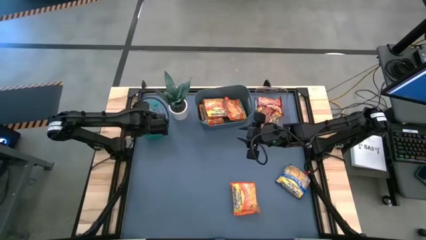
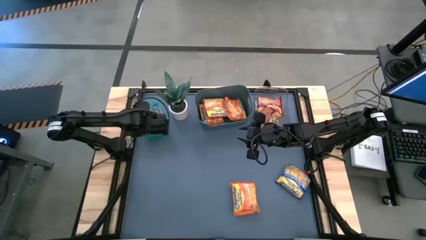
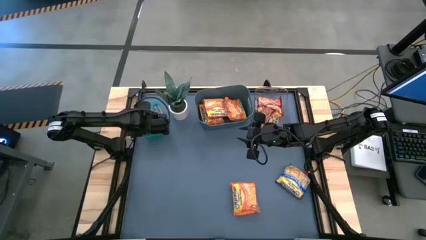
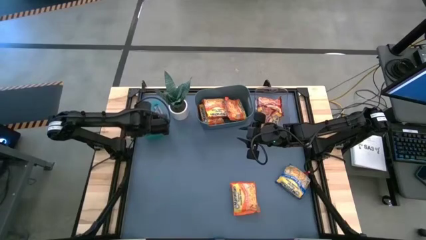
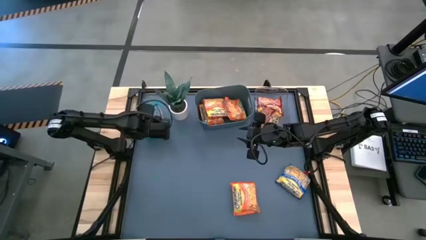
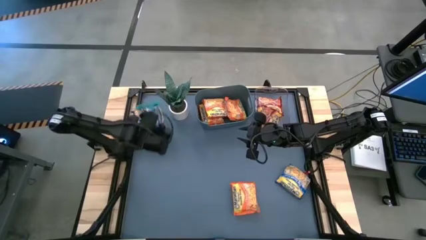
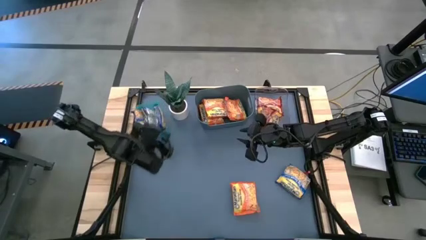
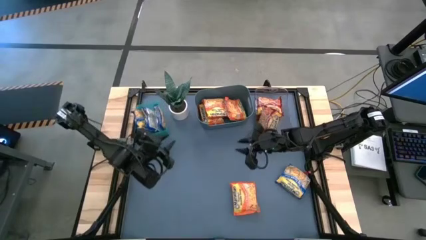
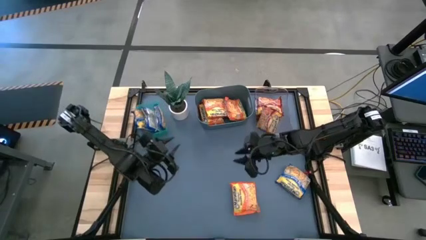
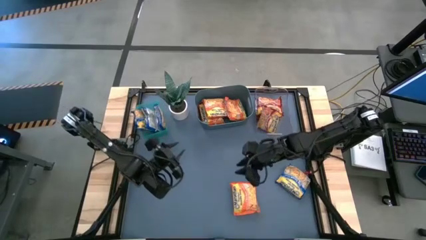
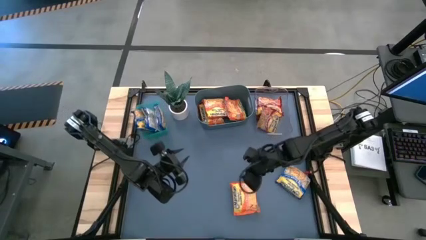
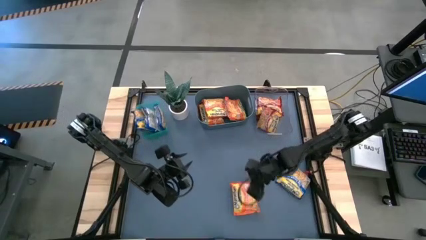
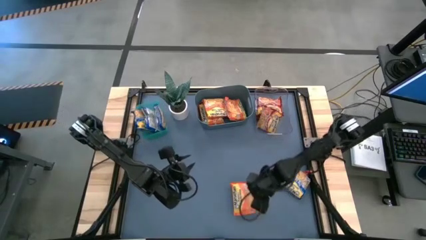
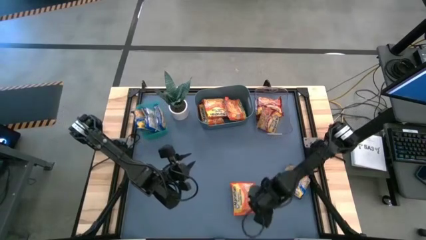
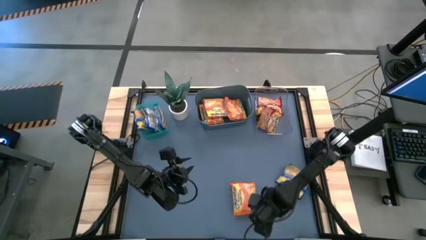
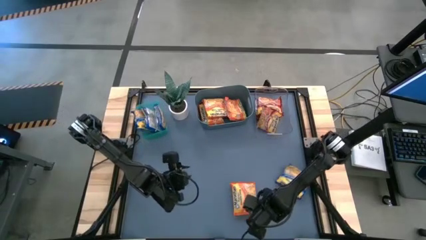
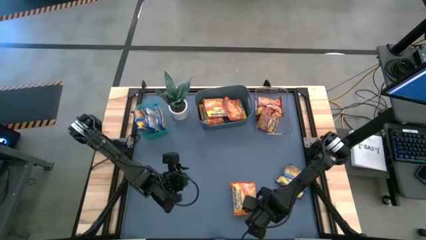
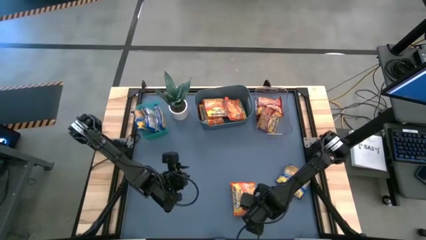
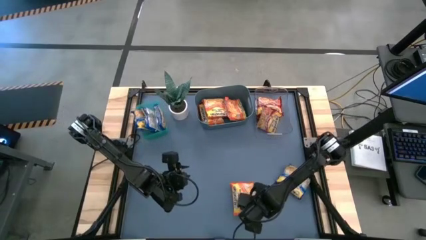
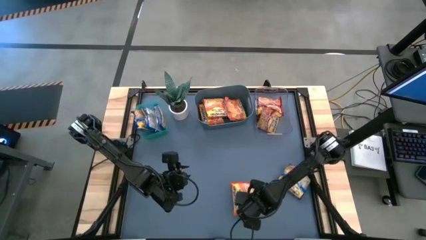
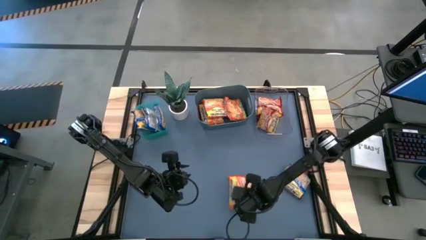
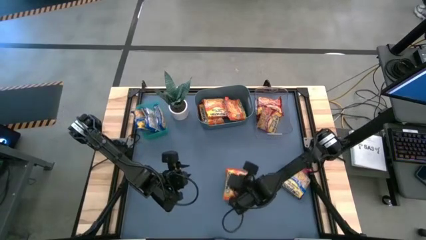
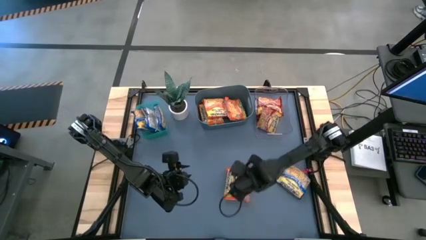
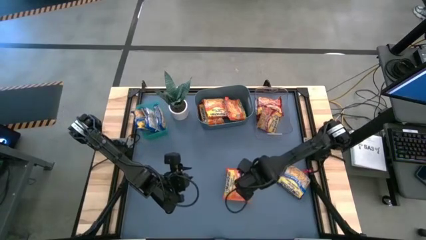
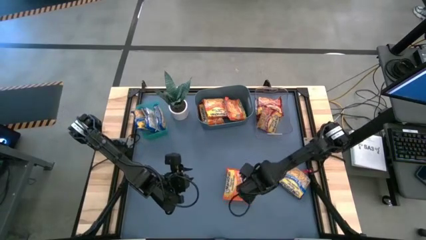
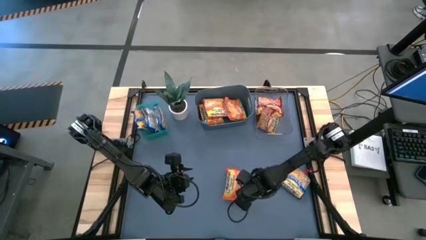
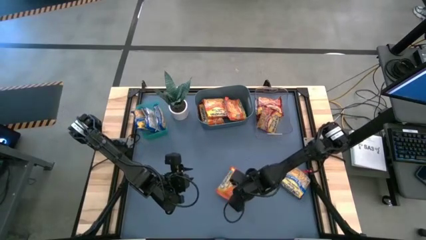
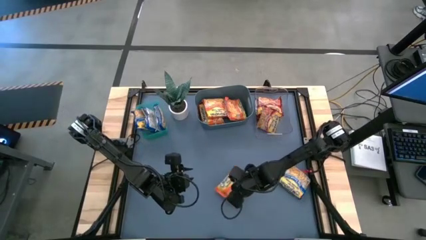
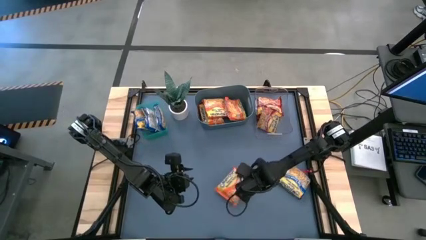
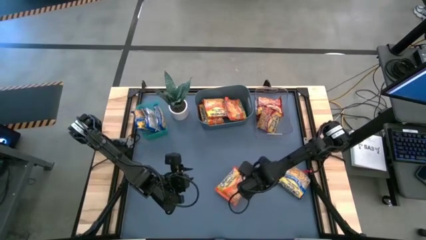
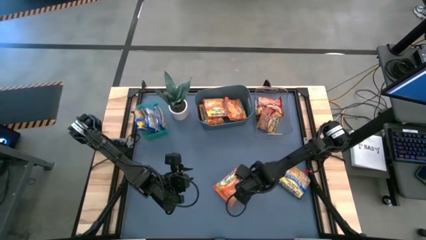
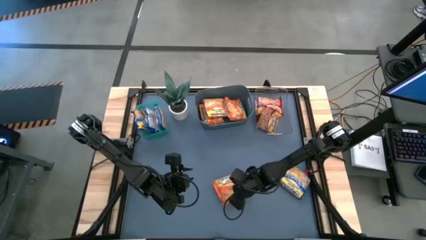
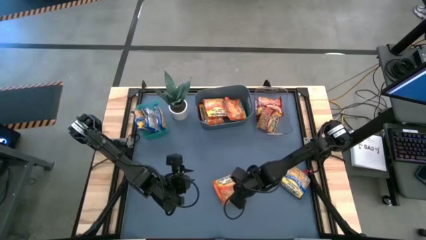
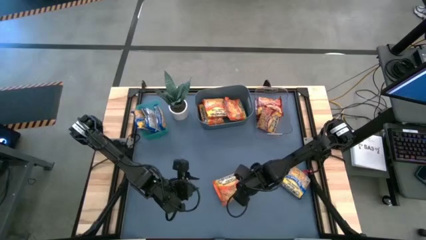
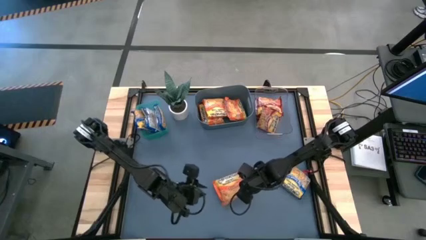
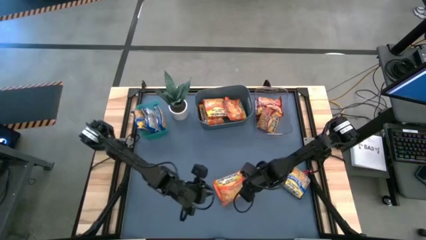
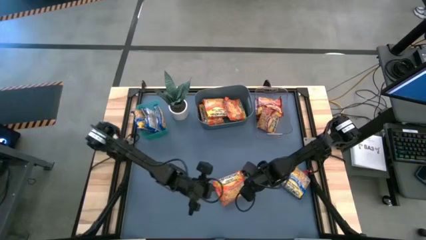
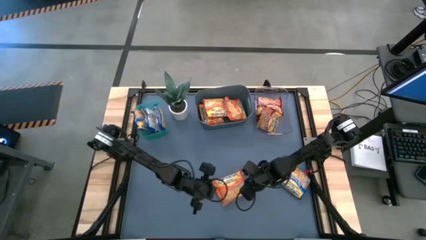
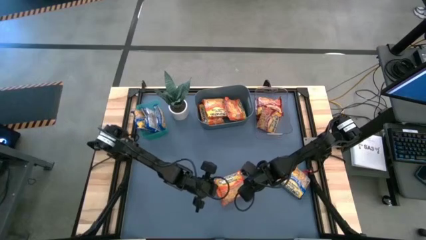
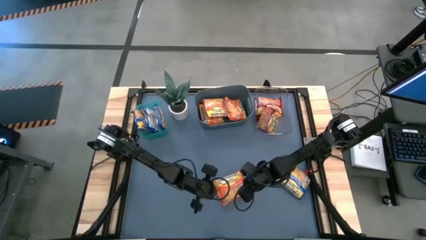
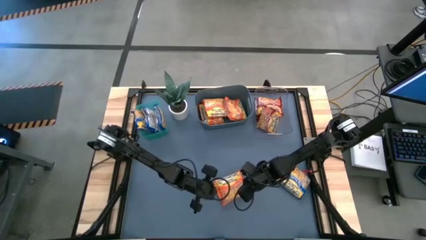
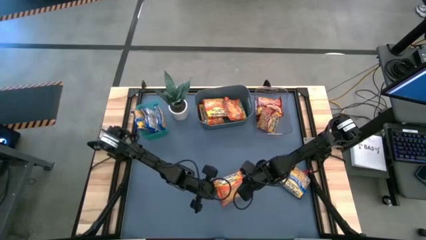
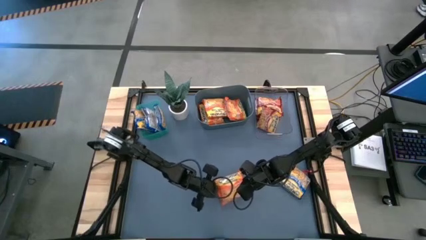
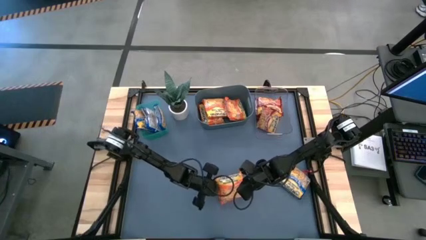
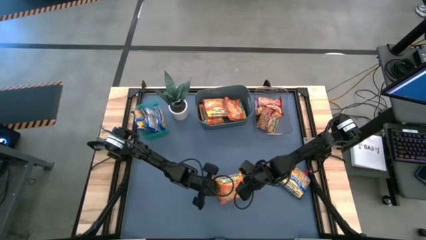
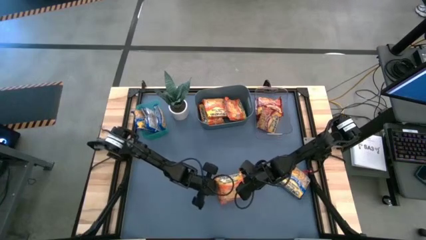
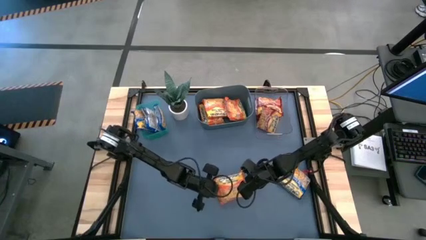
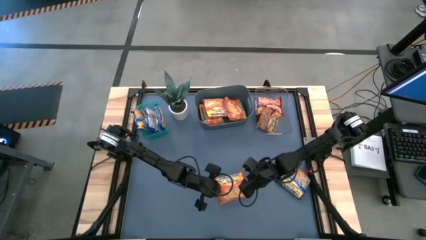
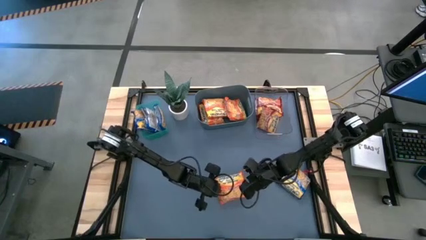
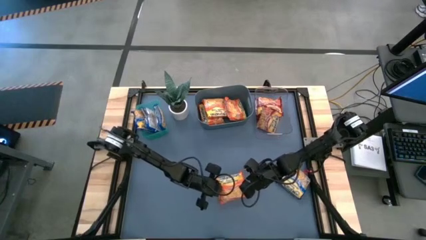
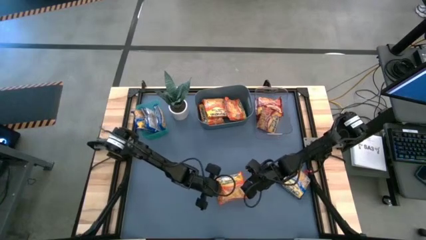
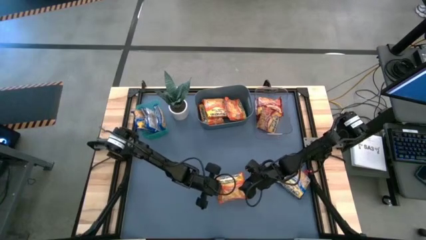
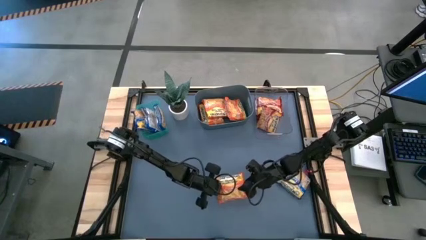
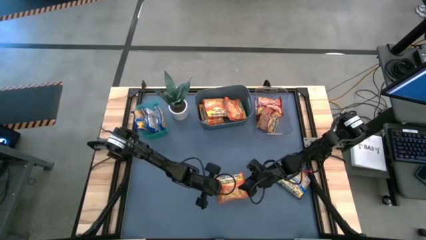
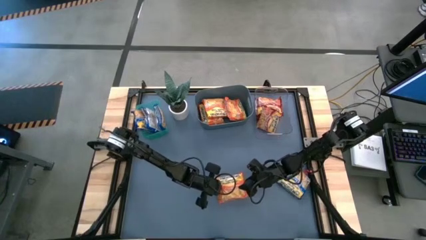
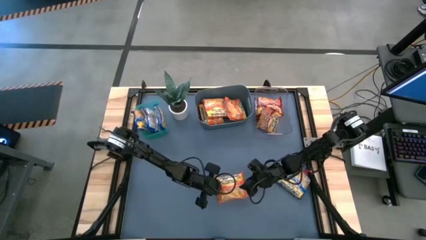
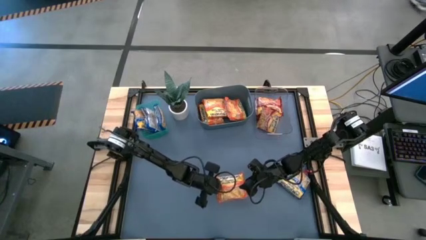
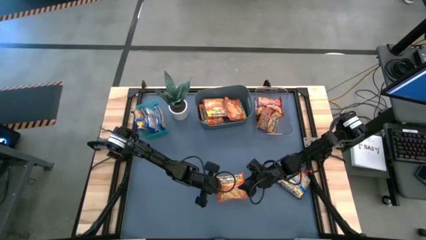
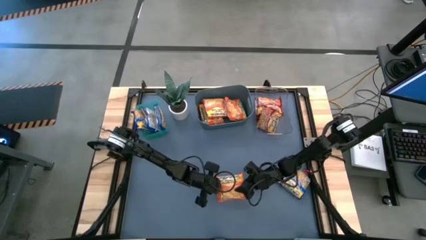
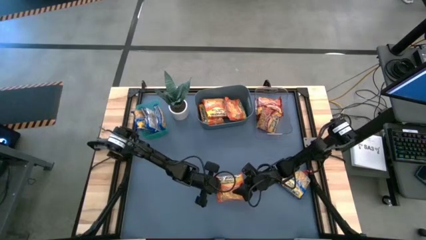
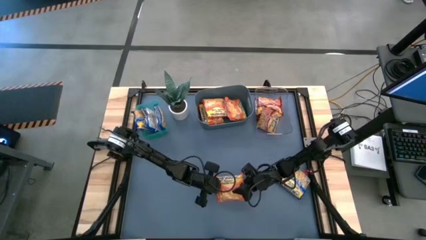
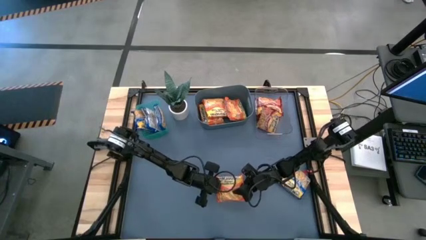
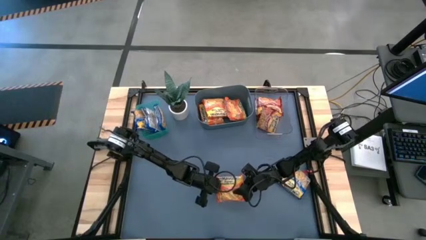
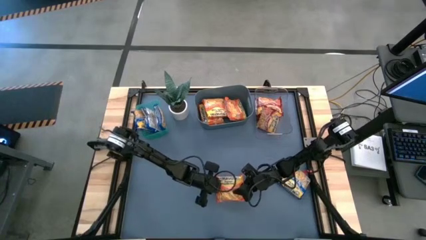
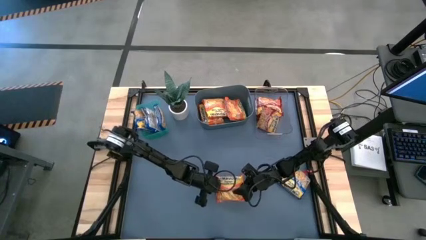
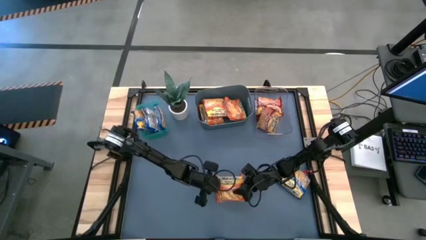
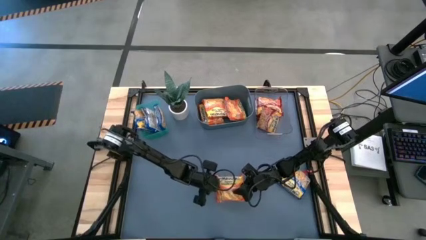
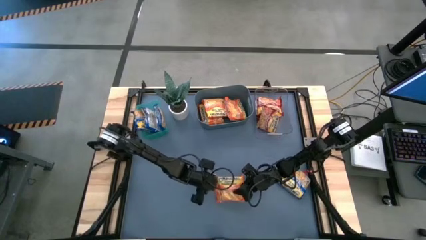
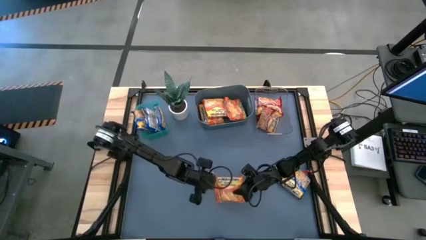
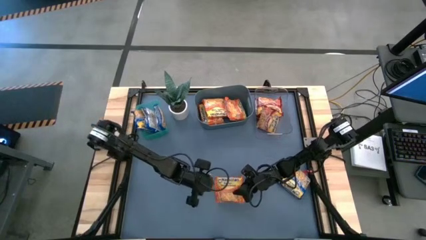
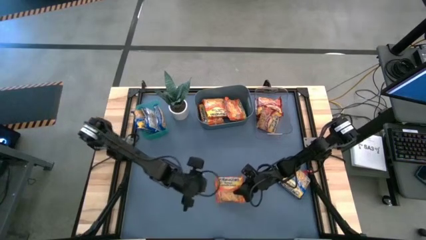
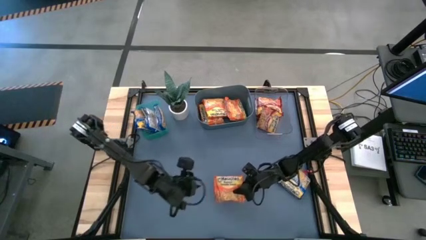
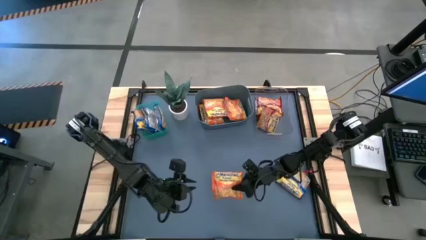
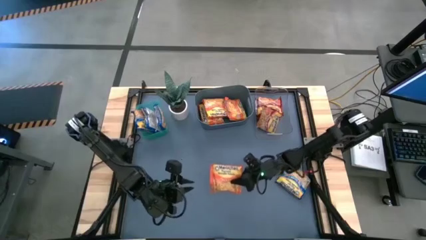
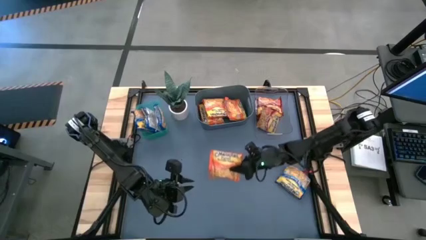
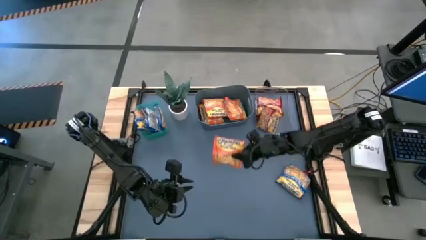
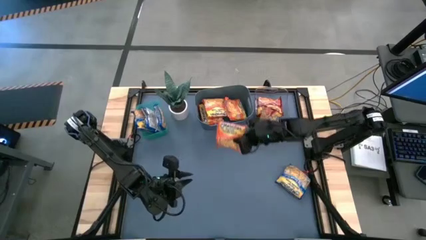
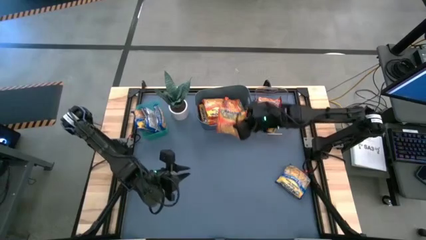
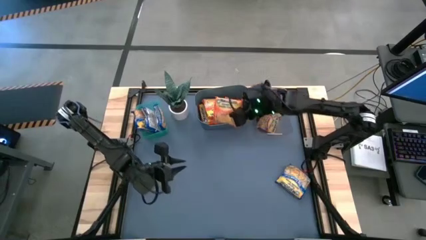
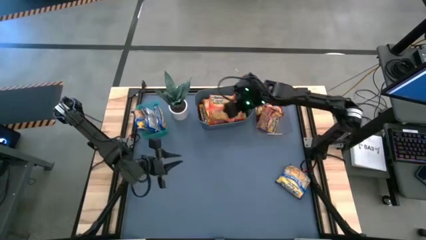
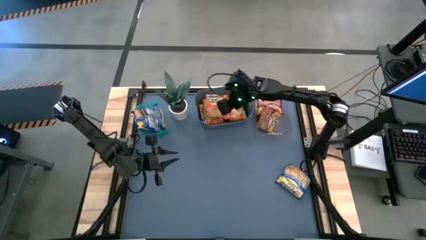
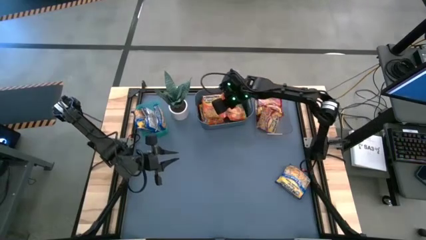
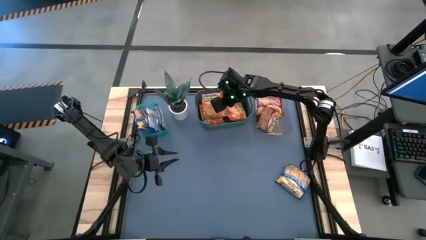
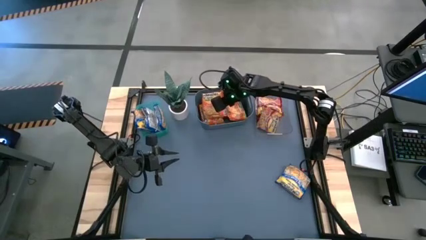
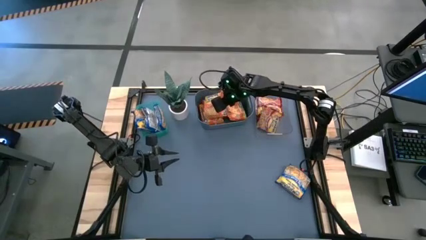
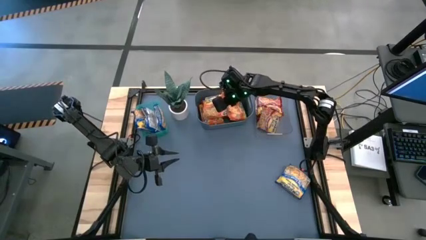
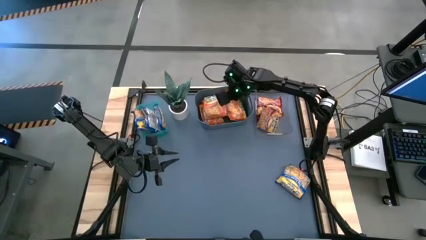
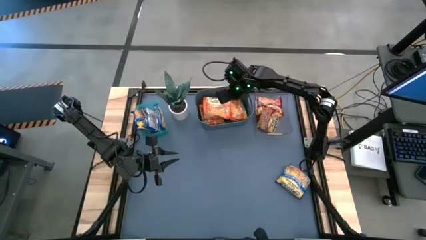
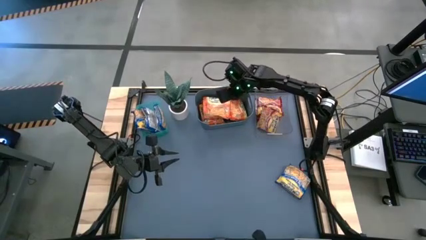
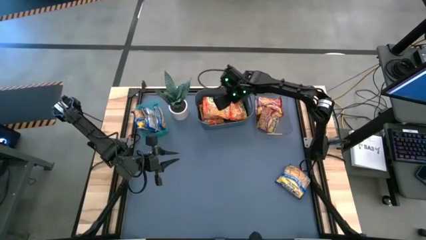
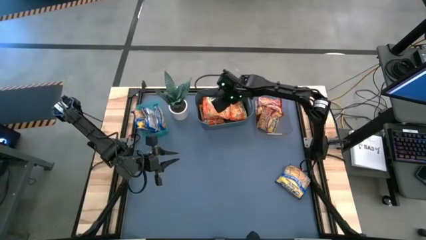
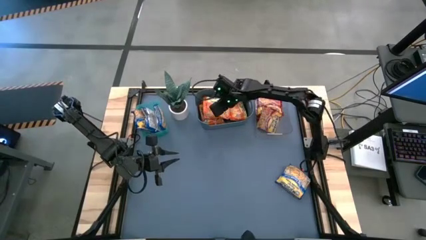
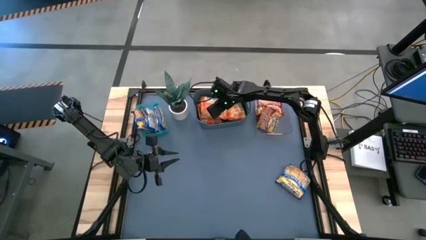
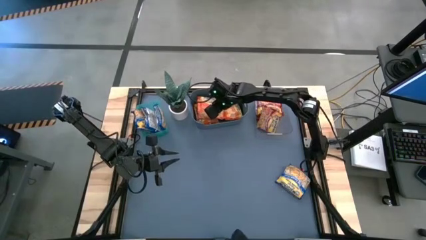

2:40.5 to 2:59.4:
Task: Sort Maruchan noodles
Put the orange noodle pack into the blue bin
